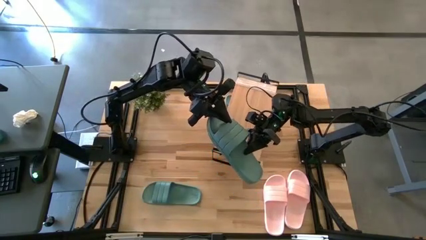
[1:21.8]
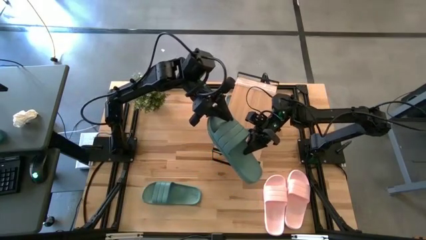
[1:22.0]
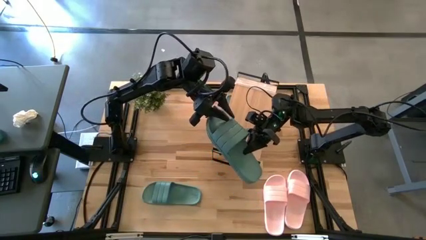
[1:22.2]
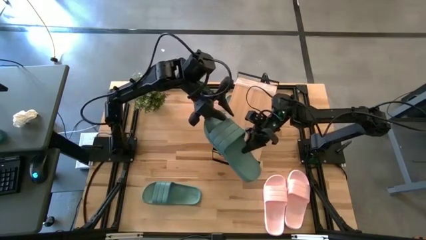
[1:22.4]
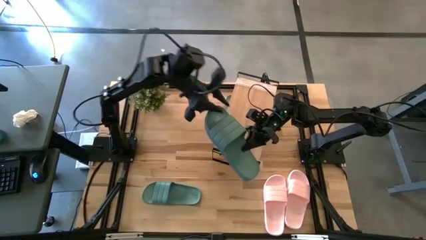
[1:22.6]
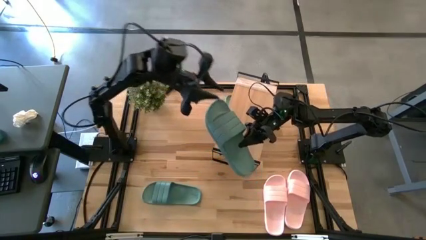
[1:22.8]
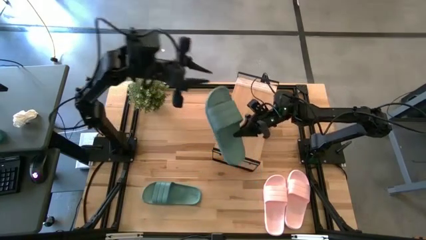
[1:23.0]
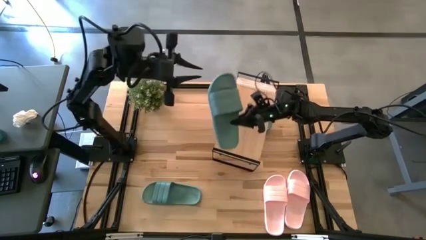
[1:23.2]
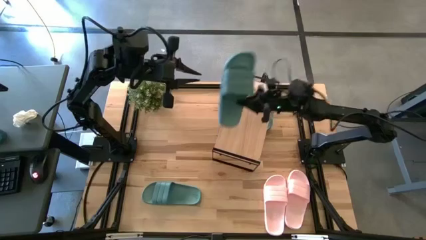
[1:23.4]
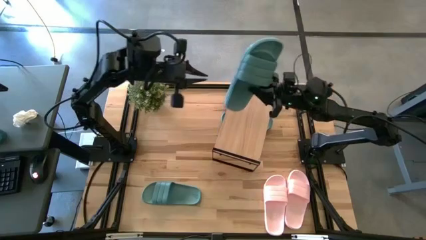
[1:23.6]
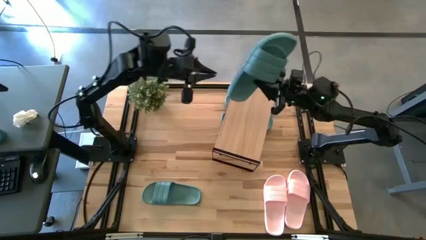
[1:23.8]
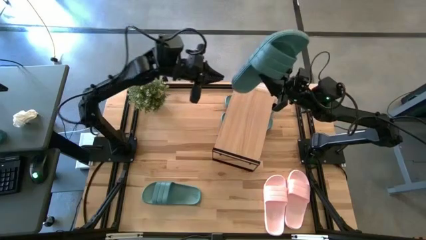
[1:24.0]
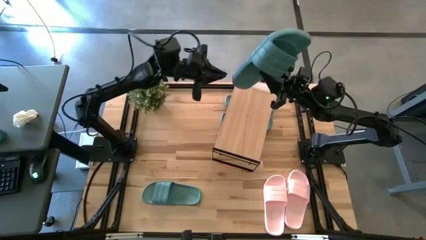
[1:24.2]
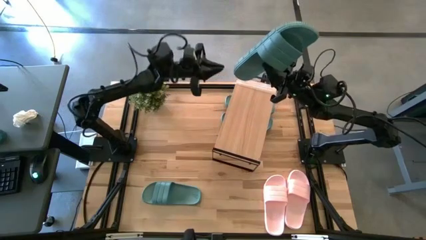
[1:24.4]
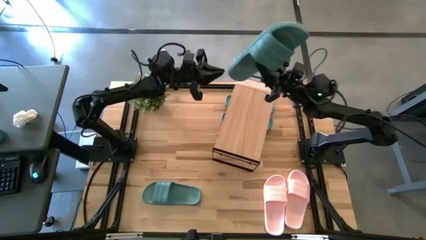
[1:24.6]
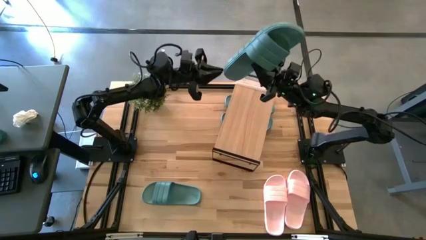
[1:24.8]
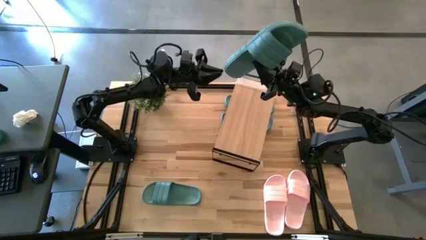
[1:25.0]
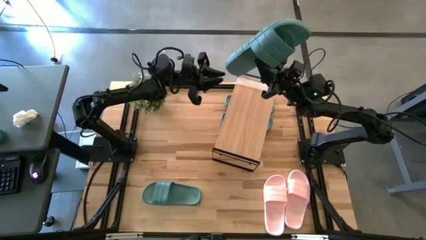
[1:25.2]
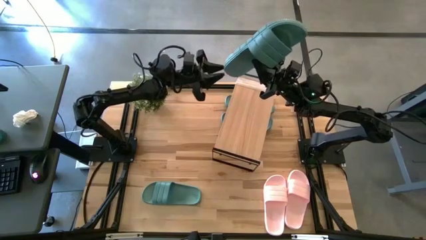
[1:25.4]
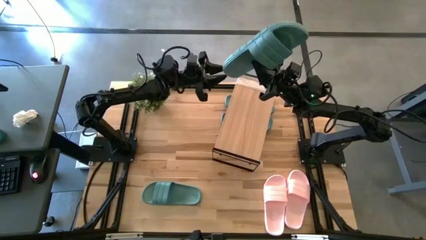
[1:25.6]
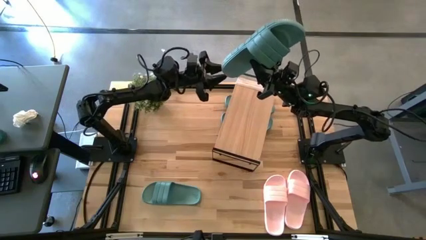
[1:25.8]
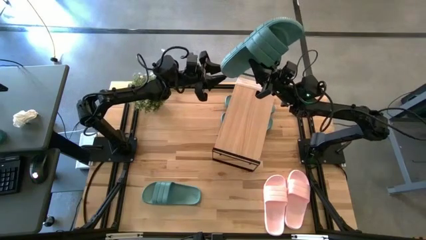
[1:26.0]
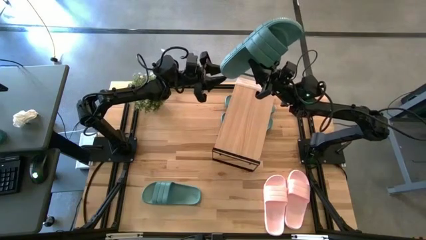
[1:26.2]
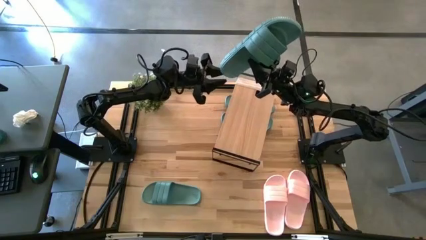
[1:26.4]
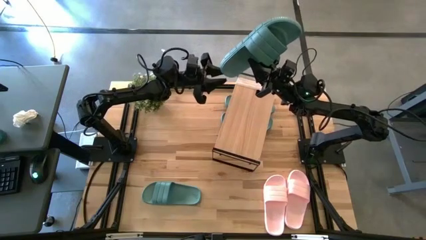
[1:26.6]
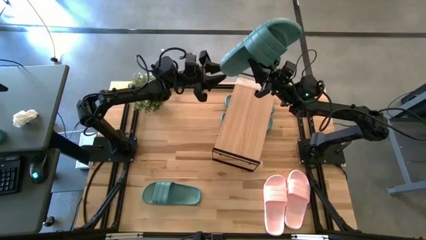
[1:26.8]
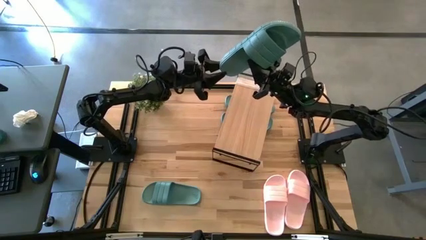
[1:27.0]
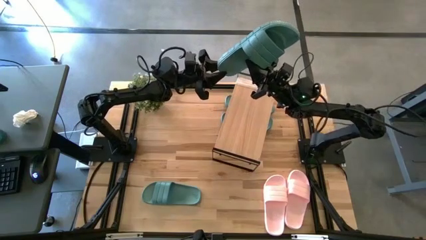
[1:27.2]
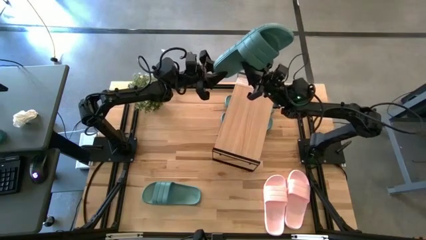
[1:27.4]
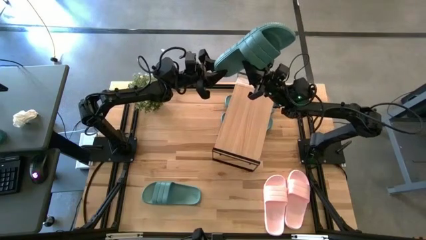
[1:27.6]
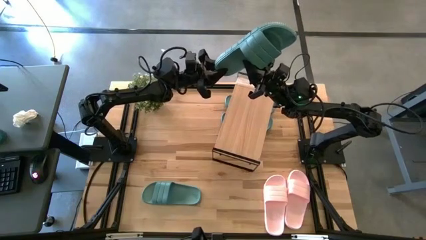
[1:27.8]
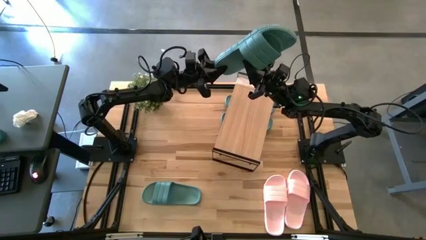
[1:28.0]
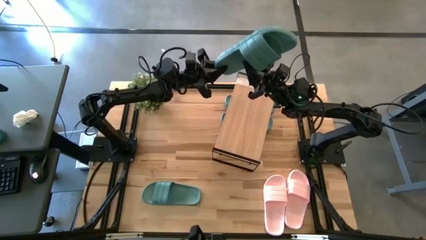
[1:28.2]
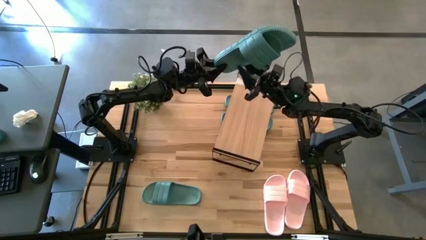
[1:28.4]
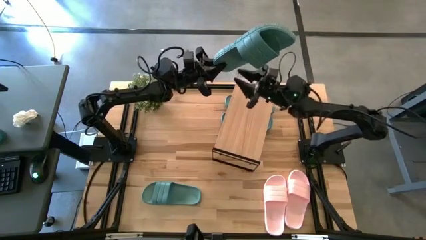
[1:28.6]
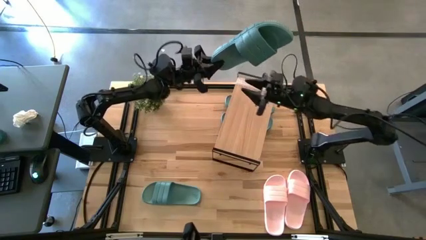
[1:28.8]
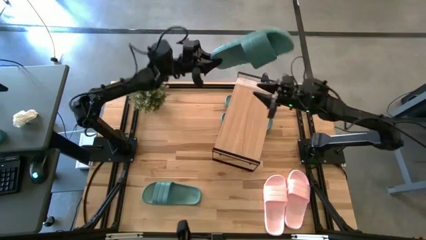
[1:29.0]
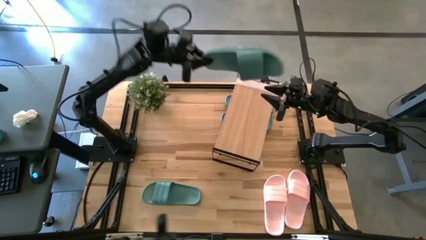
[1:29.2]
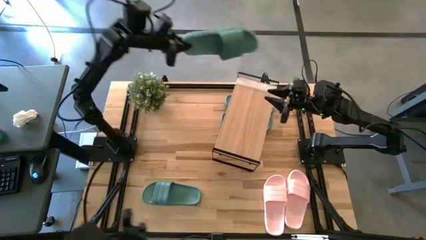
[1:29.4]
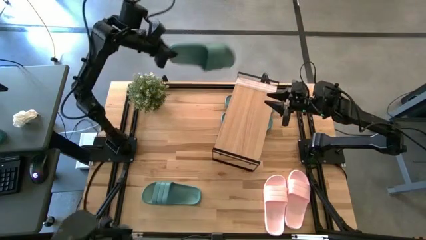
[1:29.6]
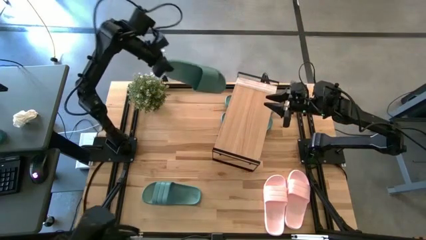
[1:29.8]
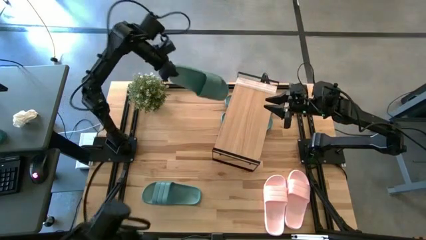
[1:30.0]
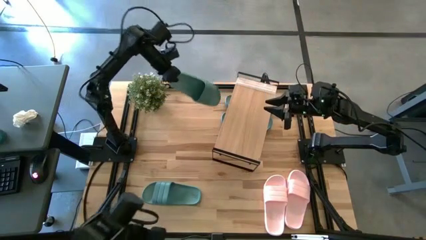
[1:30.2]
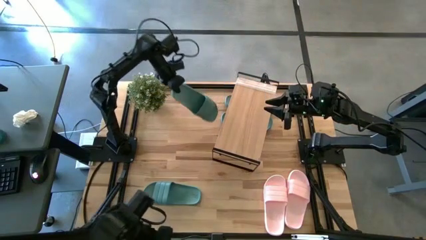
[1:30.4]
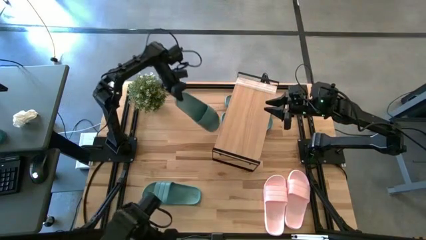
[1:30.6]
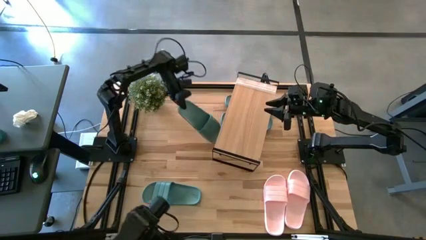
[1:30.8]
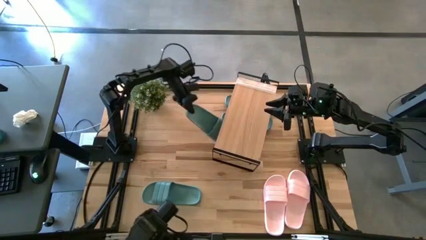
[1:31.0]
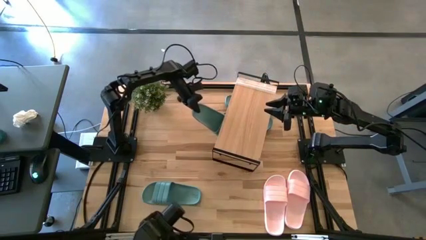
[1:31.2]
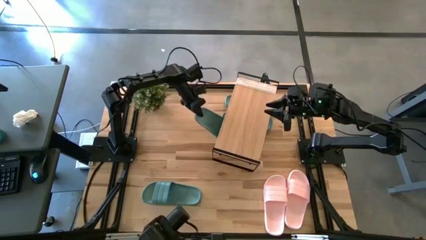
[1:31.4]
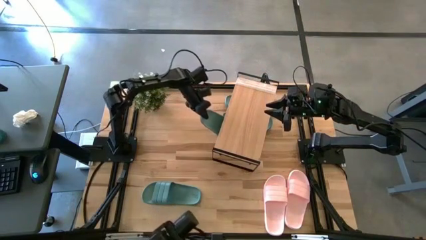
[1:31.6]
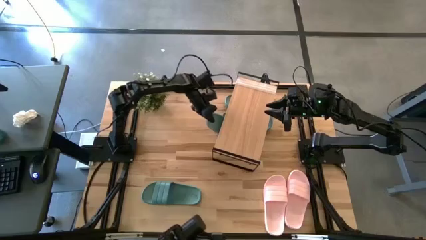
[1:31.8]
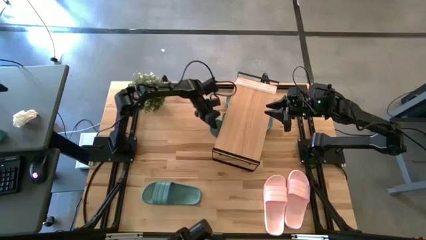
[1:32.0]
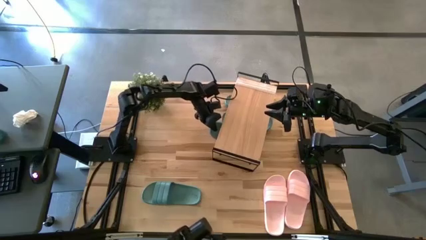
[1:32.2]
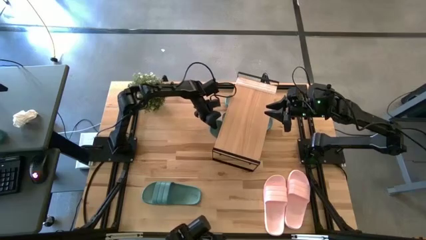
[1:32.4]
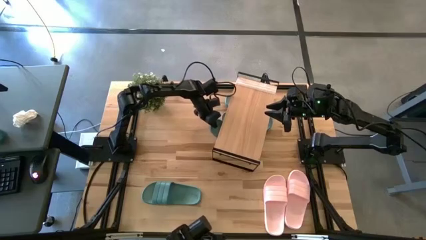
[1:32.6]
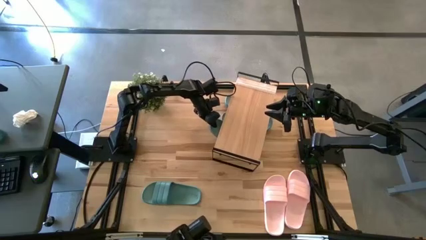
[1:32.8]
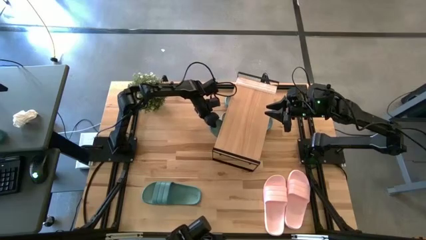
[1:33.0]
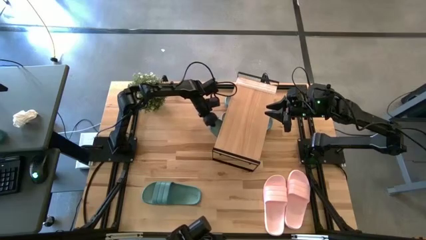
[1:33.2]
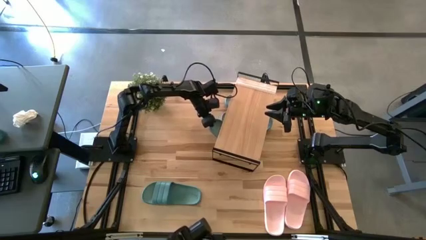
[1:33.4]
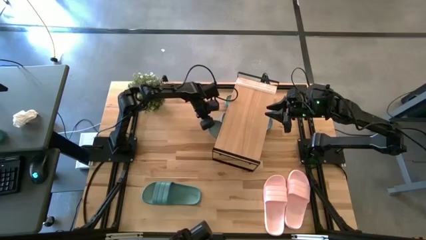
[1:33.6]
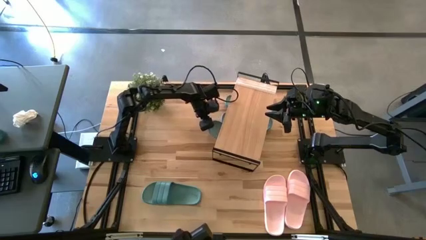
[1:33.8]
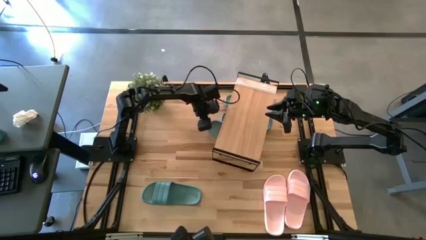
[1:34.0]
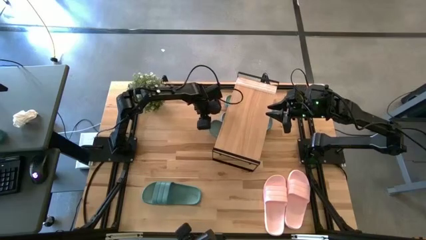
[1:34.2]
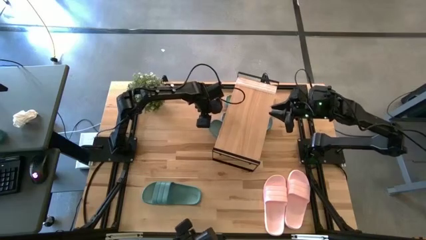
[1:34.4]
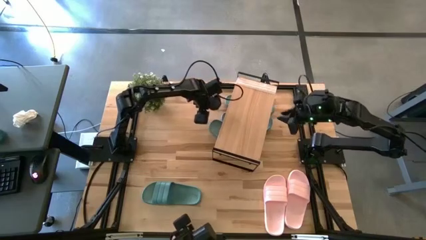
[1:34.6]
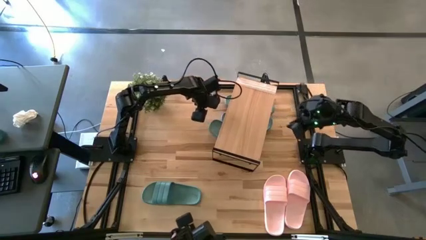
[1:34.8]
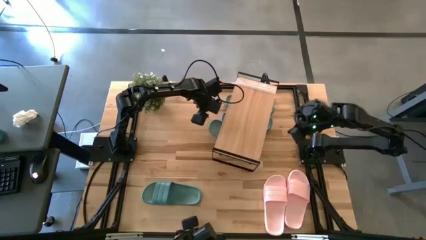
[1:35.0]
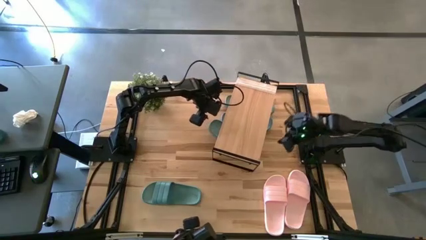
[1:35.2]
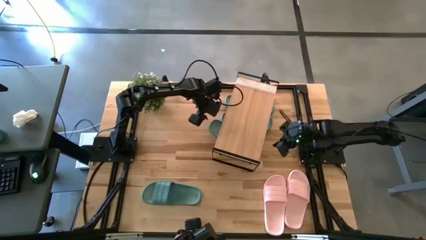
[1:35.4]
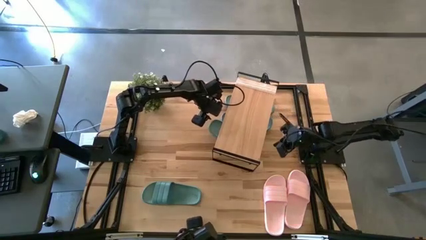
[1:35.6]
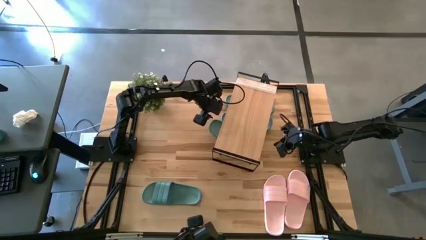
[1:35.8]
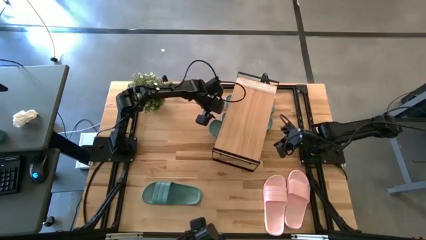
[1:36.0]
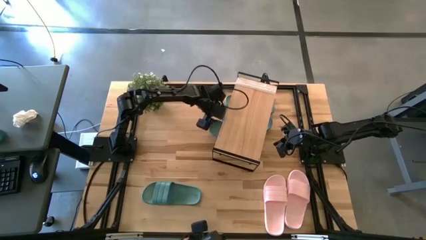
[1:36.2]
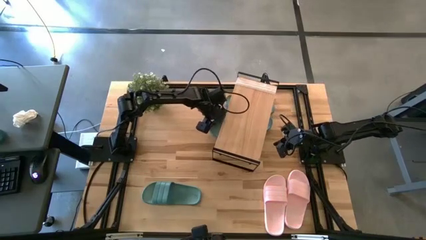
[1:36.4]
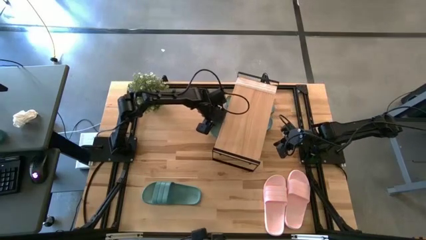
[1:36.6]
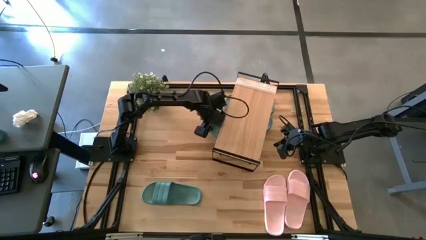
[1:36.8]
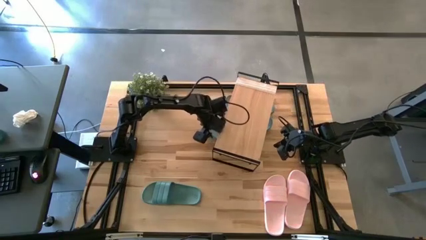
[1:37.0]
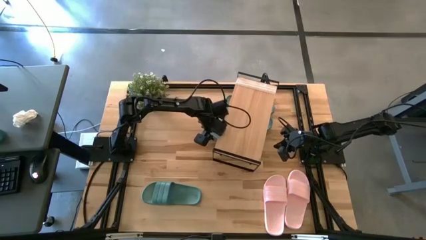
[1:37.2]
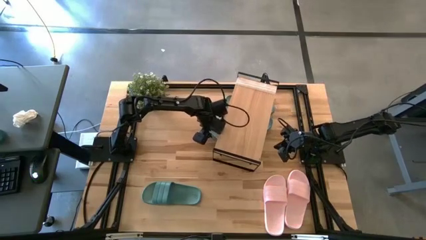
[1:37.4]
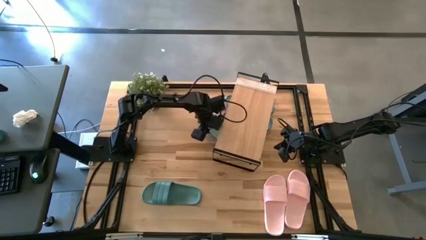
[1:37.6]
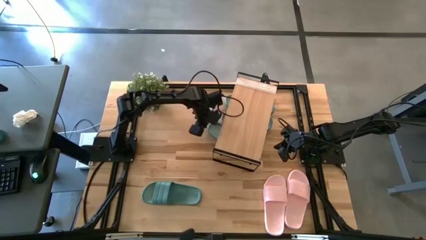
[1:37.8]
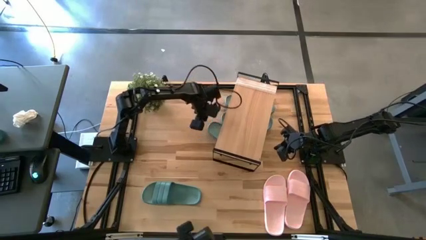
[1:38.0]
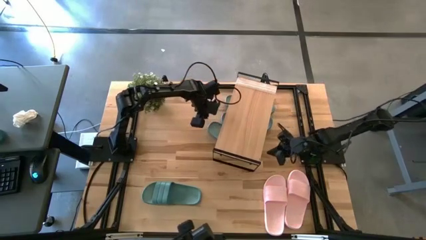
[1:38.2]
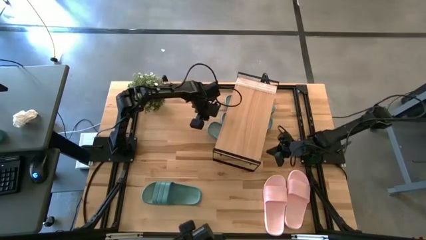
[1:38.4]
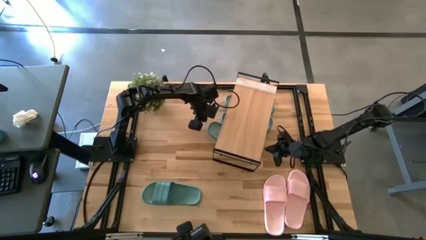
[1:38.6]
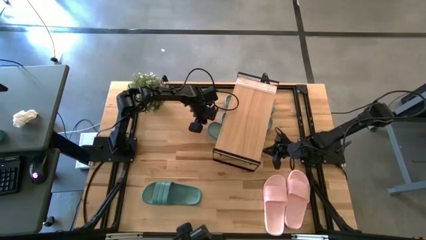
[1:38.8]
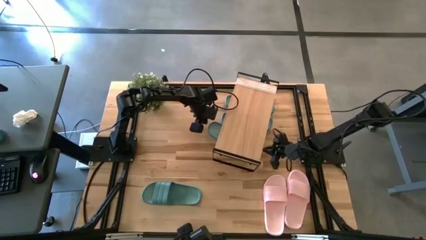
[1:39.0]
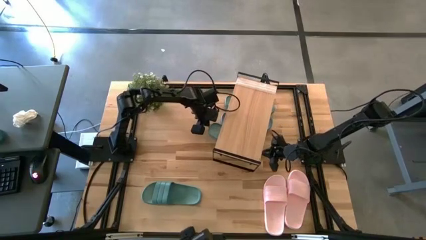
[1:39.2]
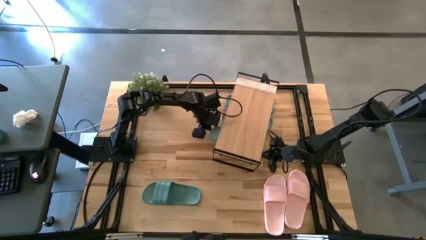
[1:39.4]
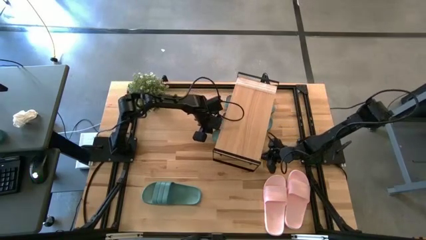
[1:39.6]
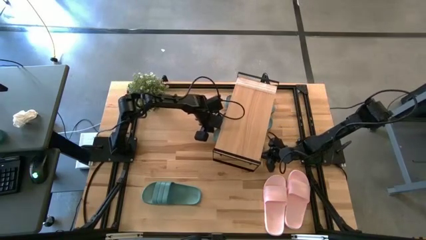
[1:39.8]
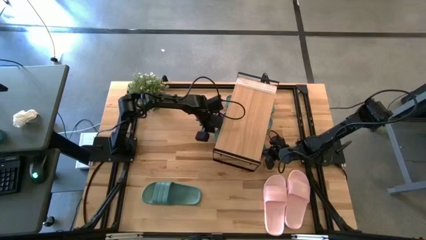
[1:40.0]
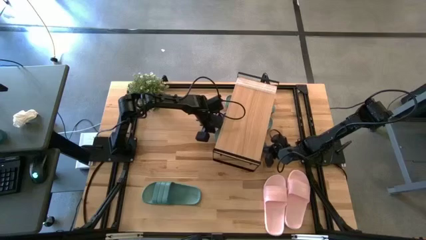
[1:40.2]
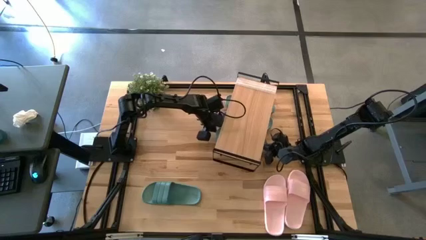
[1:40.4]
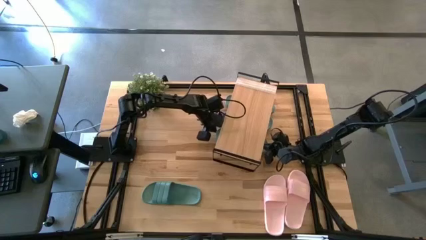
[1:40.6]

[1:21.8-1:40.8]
Task: Pick and place slides into the shelf
Put the green slide under the shelf
